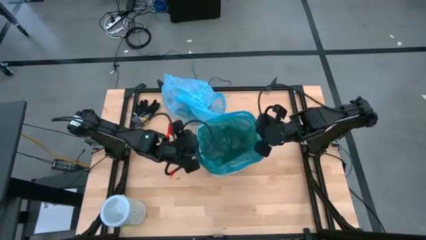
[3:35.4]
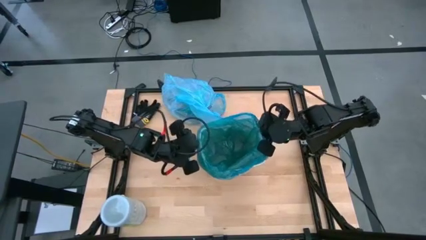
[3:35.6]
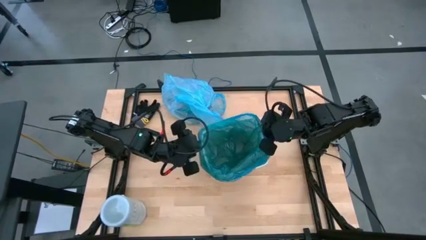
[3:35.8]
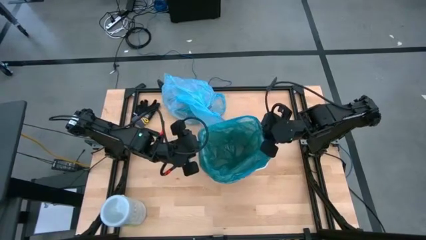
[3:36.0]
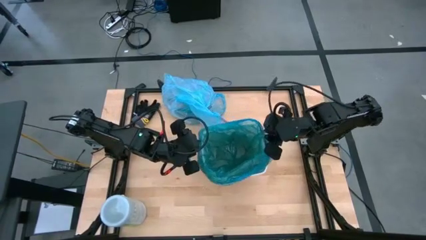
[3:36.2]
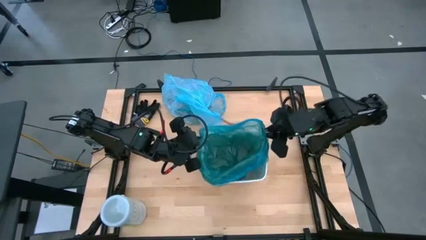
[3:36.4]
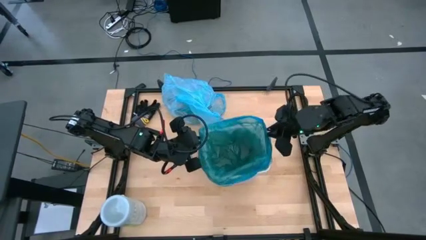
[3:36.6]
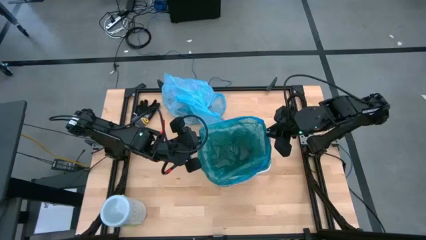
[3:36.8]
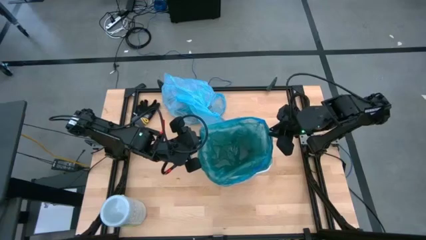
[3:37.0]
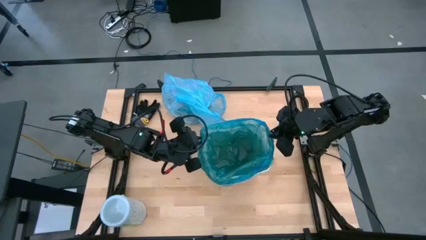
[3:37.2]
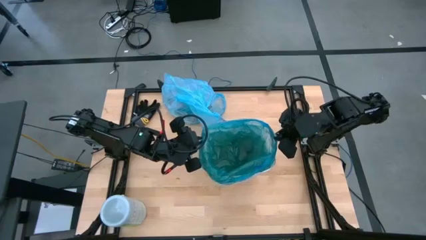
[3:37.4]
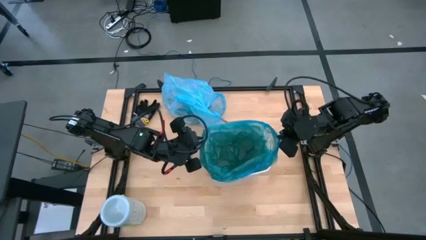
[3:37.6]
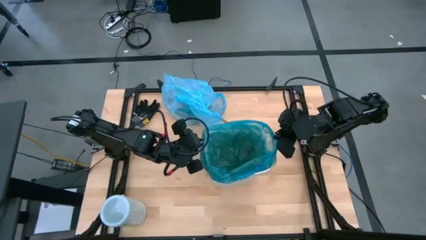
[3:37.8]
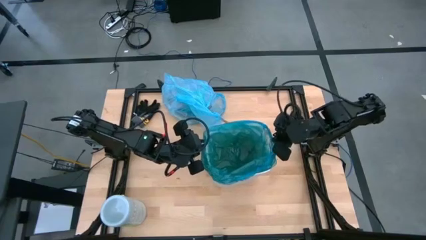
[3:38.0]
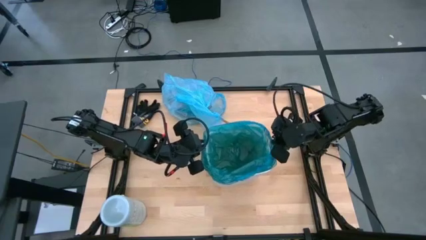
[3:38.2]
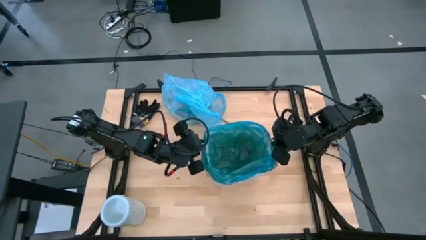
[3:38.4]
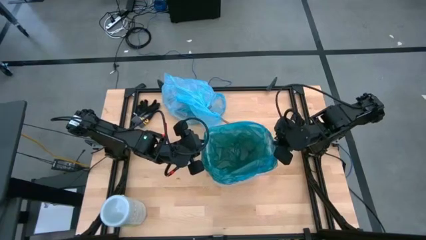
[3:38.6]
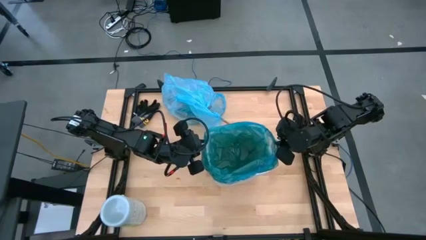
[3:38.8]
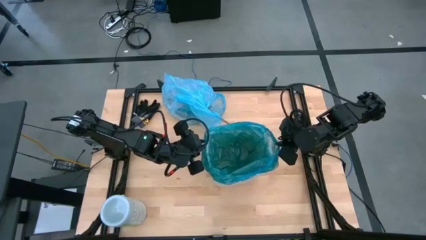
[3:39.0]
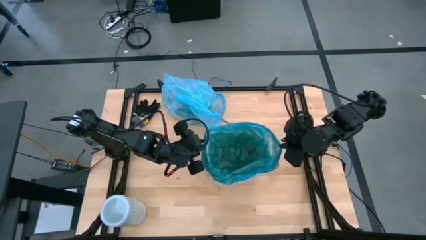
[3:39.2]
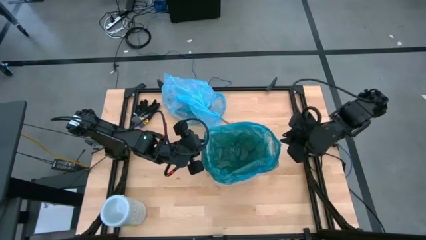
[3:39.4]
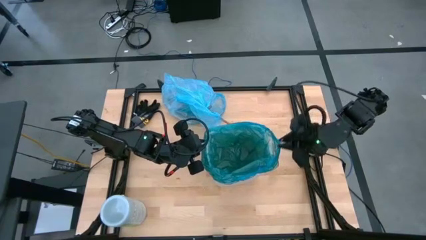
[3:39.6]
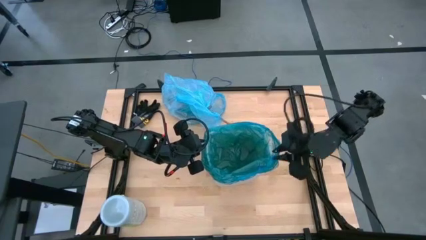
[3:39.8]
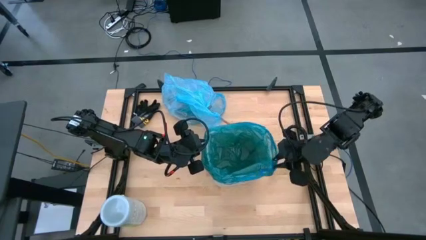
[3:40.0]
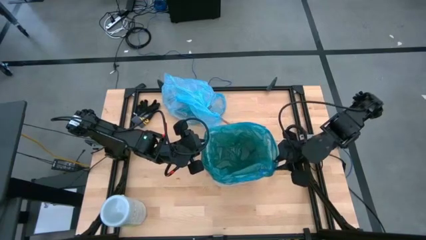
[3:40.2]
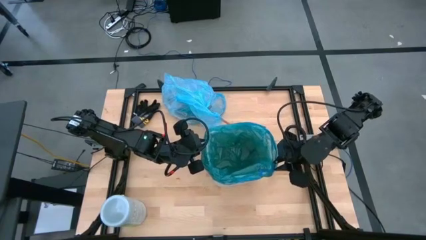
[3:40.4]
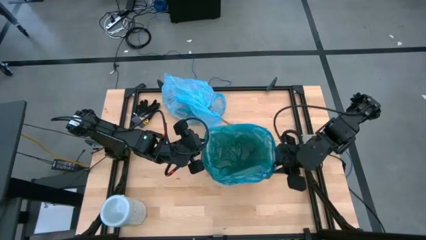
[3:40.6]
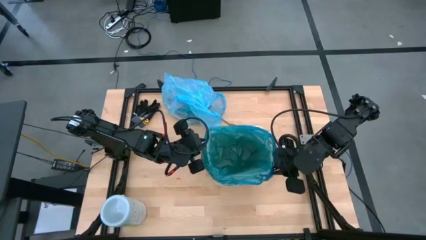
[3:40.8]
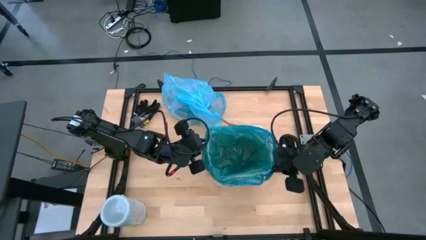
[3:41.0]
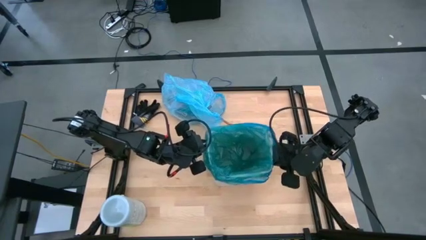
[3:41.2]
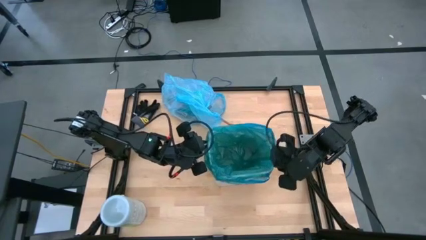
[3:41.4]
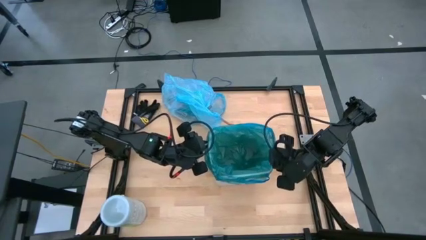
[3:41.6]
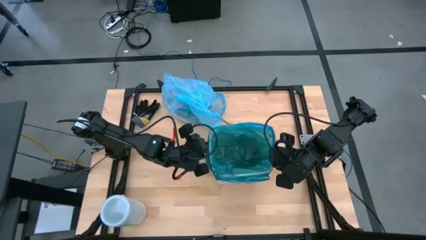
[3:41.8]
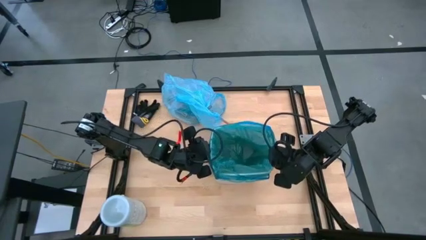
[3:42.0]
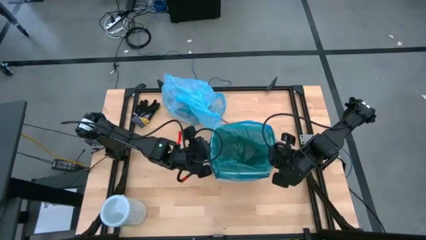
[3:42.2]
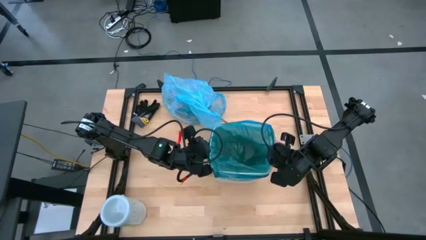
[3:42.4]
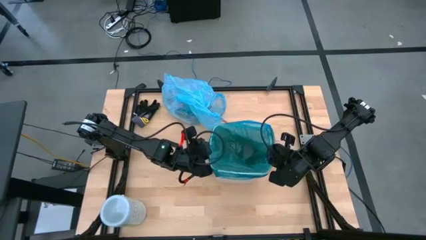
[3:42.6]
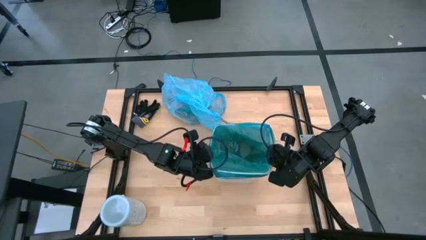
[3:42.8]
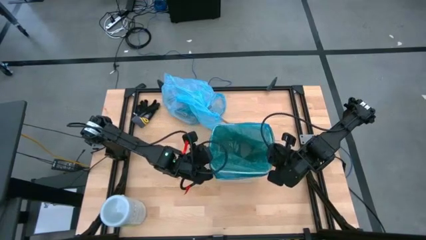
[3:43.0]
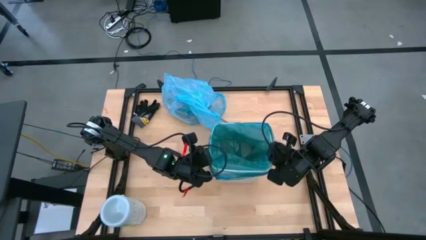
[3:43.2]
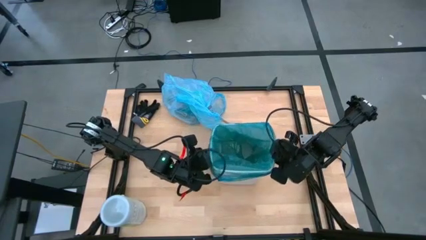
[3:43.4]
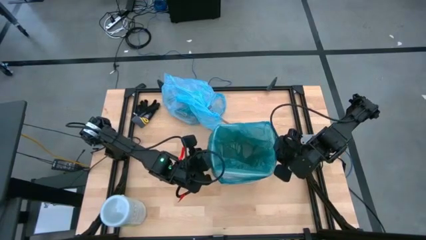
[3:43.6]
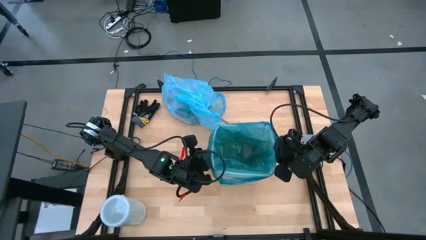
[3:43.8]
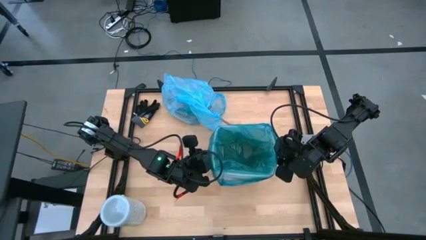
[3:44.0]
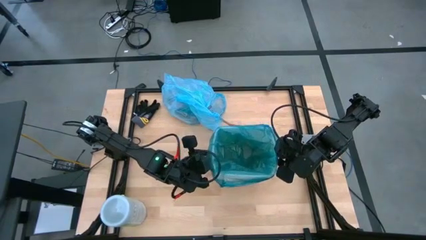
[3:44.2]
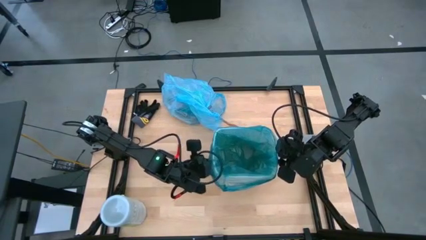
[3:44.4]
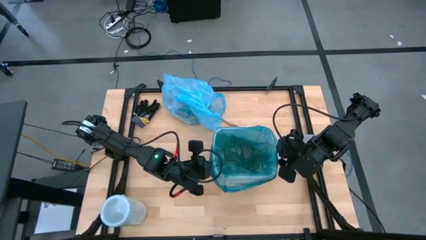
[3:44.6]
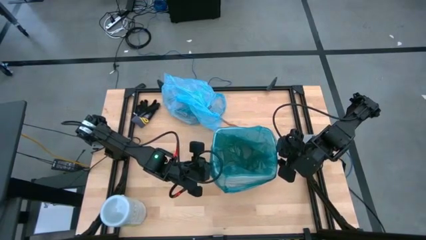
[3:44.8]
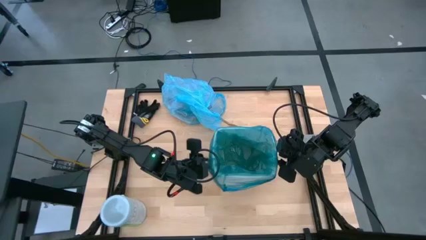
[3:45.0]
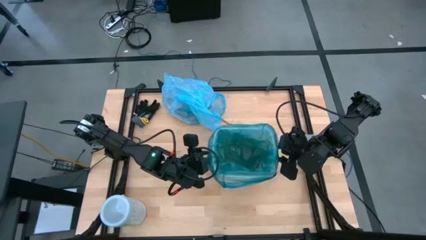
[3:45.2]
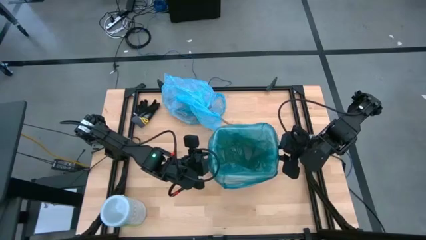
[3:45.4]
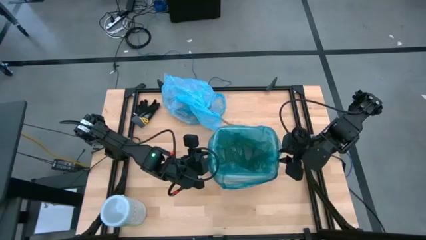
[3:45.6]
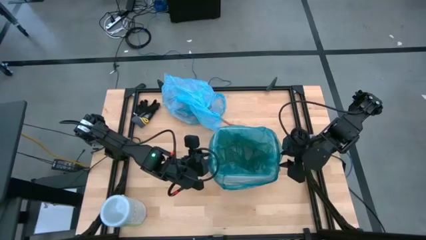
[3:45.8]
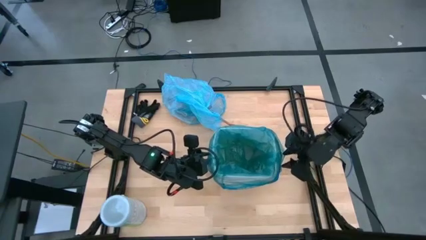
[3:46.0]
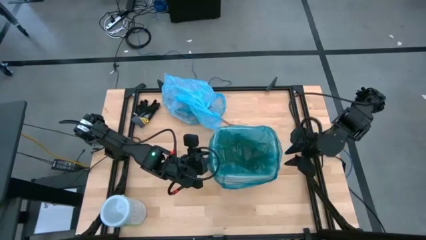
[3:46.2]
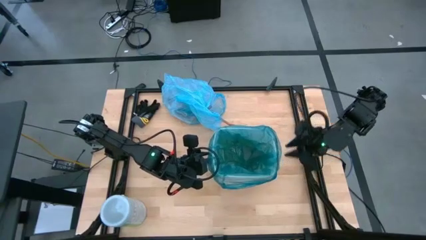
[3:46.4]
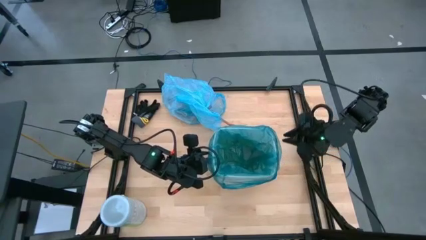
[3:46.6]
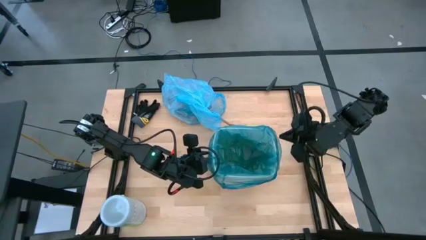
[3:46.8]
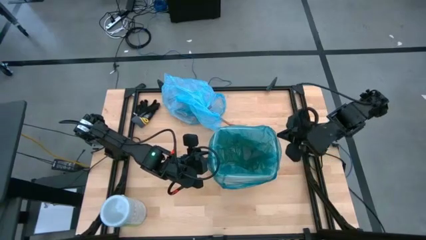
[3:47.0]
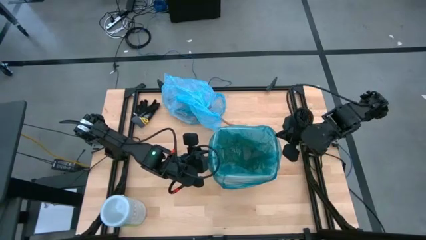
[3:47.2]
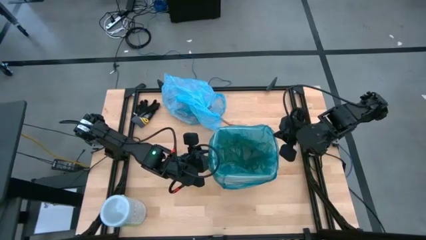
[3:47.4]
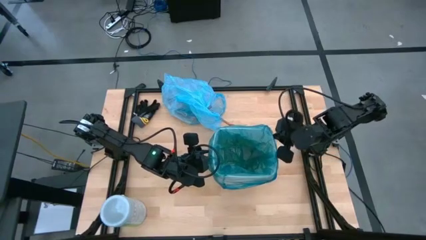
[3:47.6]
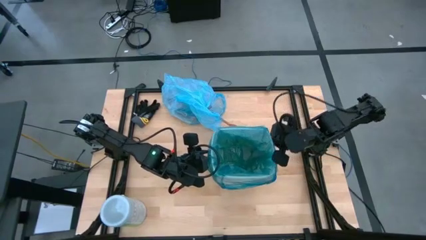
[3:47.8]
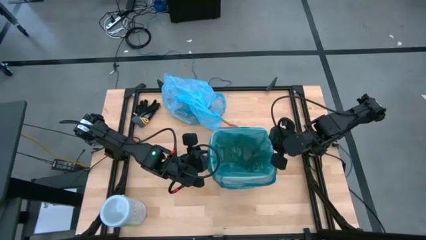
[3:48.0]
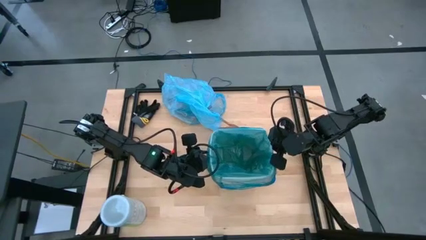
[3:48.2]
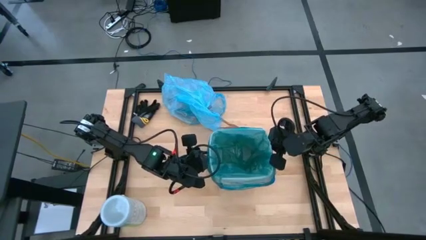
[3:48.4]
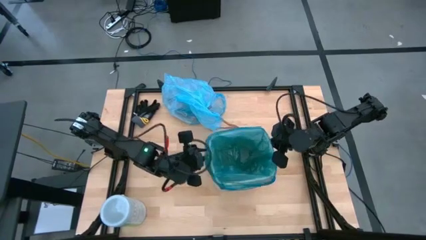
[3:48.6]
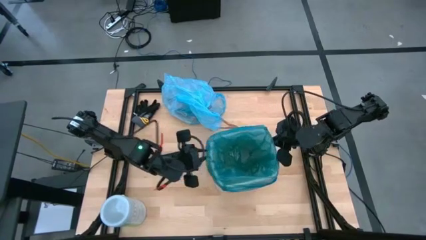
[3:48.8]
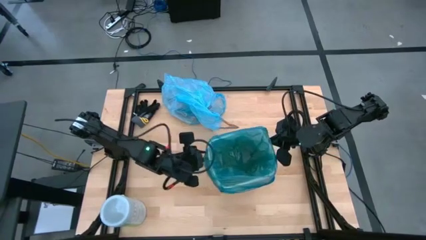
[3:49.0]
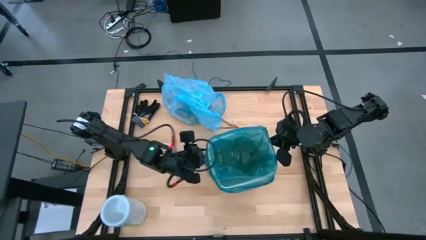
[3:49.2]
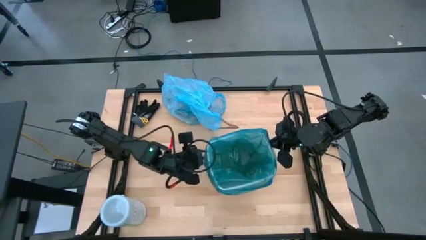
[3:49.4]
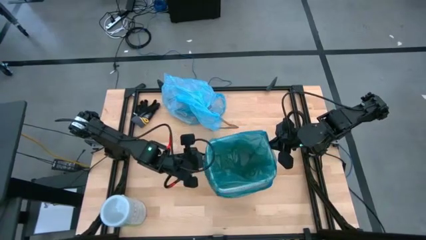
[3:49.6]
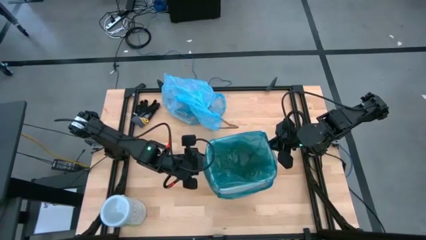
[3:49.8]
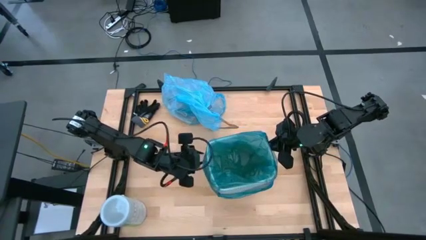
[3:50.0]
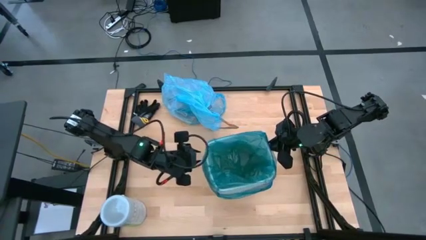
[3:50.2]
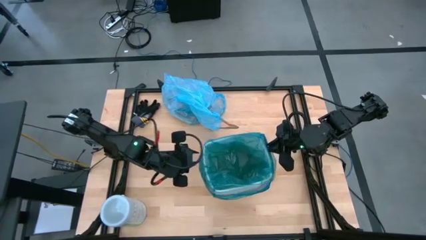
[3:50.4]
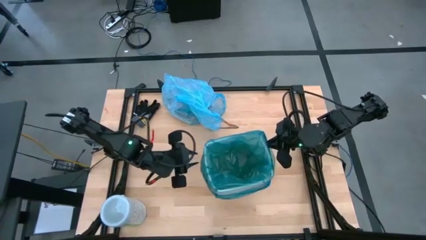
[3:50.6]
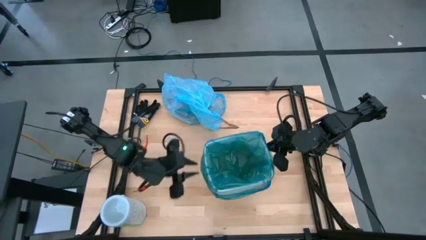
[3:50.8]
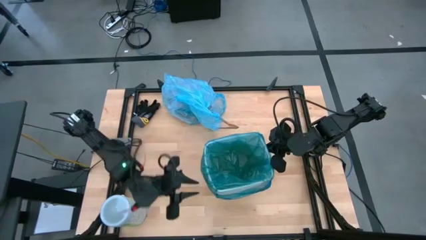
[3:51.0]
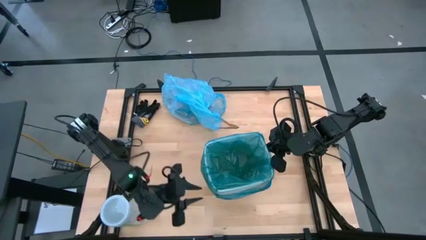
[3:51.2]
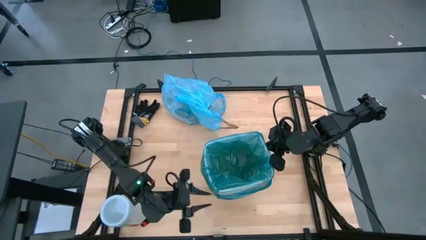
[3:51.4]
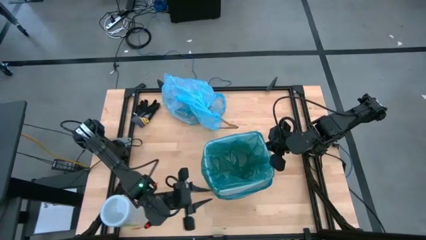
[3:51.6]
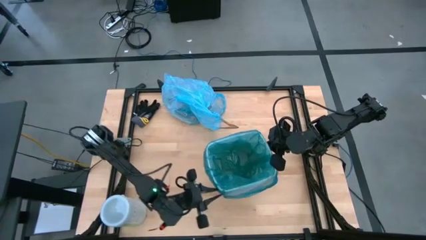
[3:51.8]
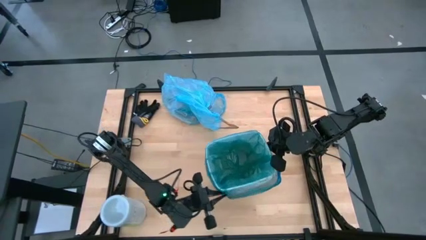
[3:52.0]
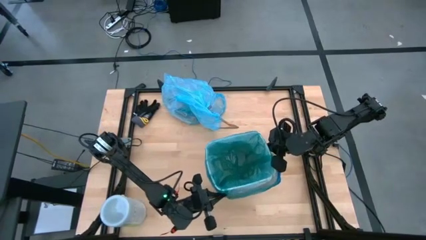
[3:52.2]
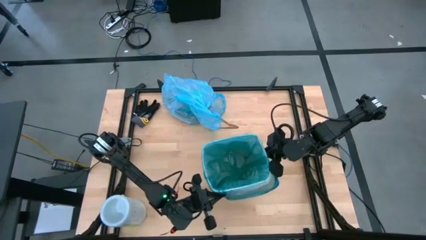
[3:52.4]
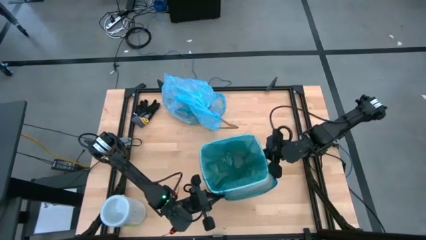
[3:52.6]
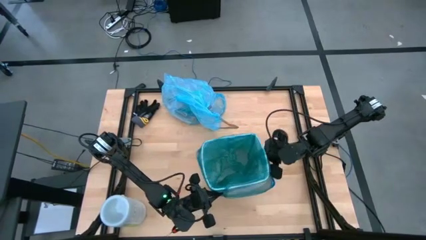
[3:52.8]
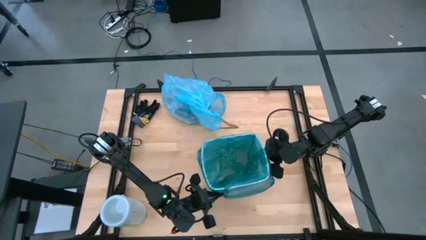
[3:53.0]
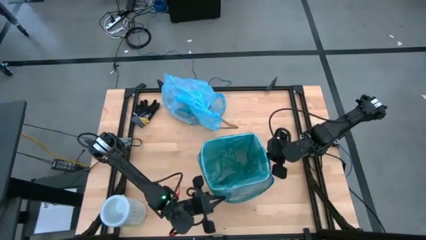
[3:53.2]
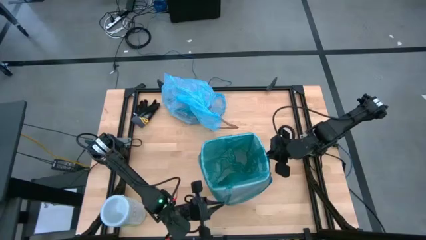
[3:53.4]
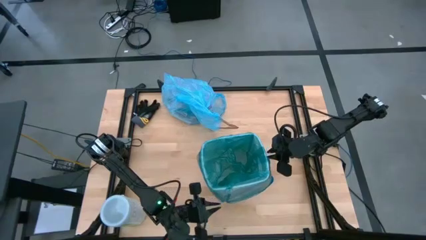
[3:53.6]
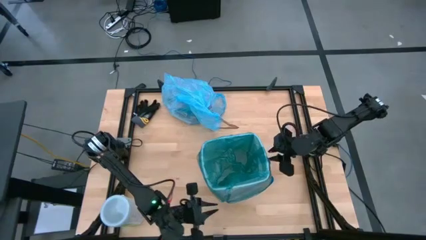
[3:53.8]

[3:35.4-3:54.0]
Task: place trash/remove bag and relplace
Insert the green plastic trash bag into the trash bin
